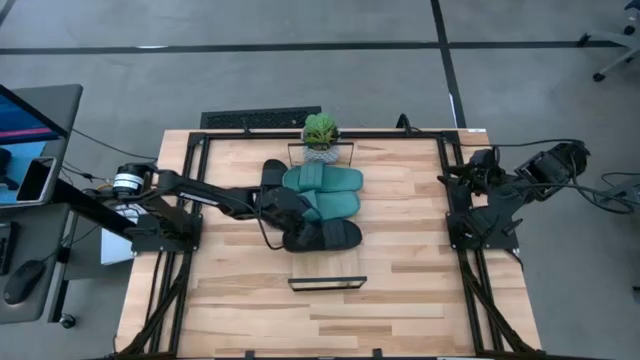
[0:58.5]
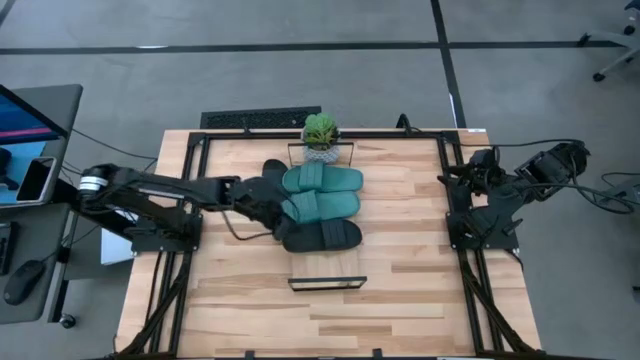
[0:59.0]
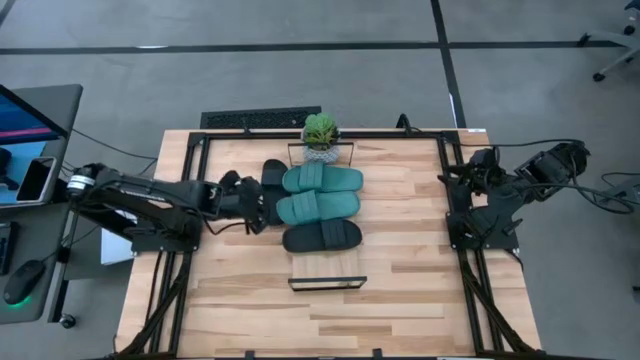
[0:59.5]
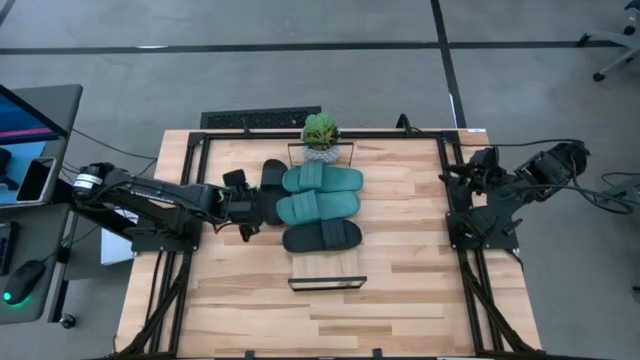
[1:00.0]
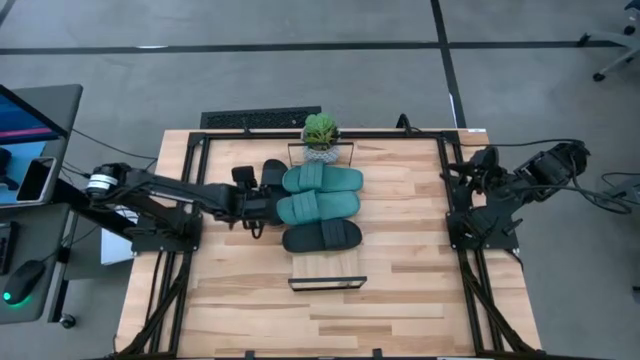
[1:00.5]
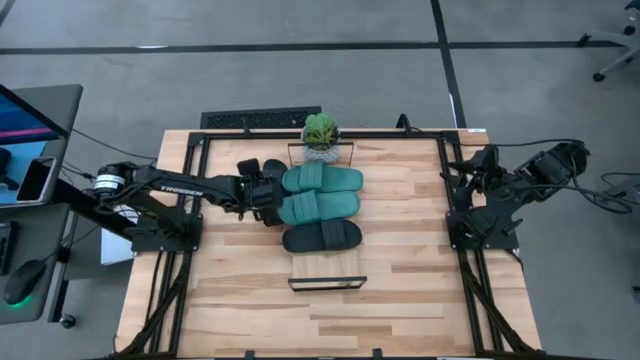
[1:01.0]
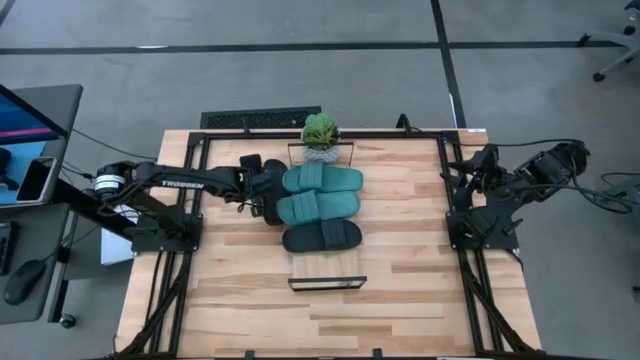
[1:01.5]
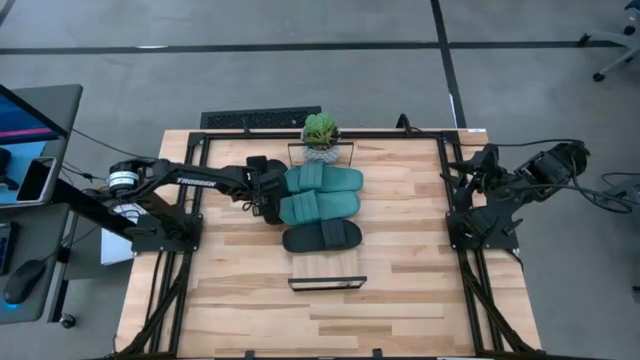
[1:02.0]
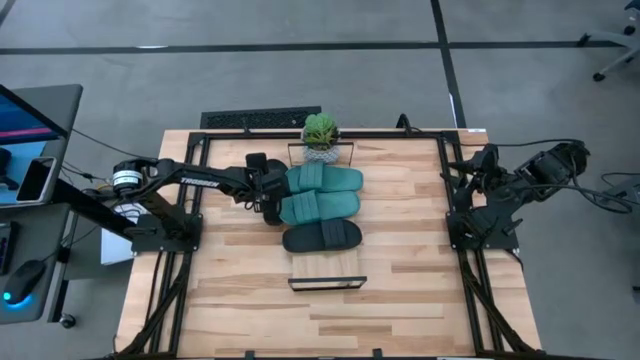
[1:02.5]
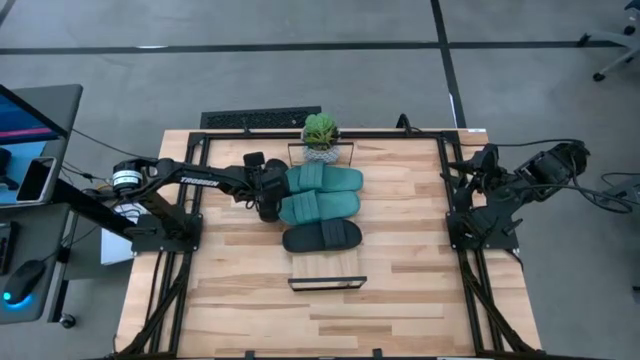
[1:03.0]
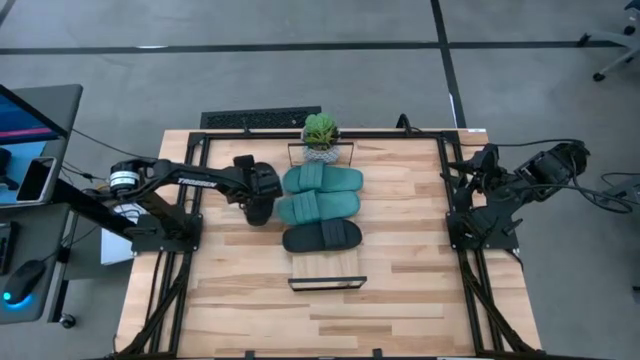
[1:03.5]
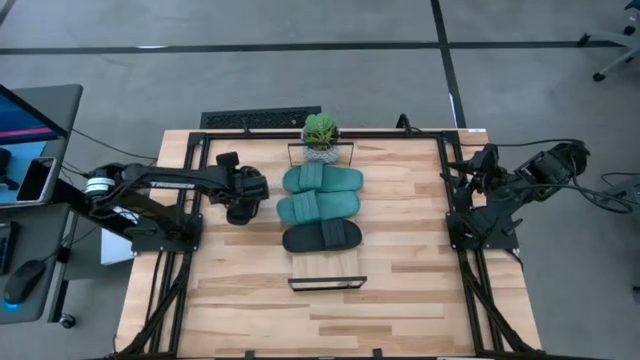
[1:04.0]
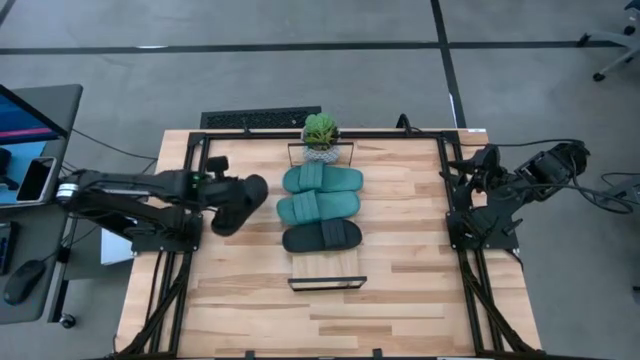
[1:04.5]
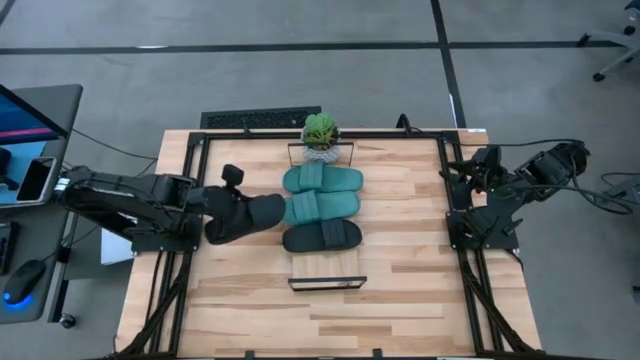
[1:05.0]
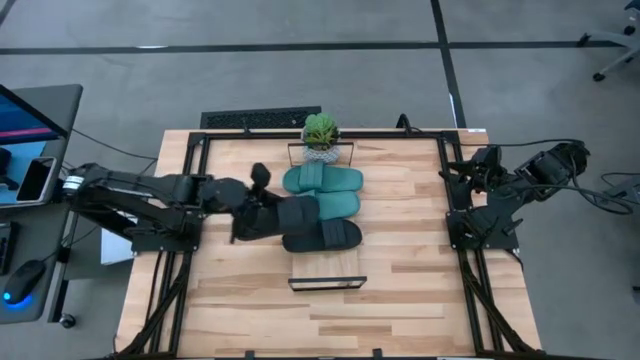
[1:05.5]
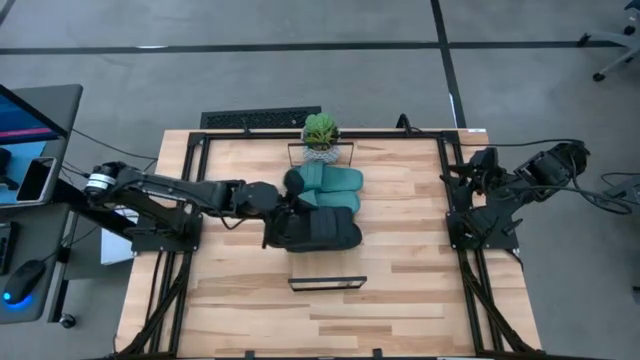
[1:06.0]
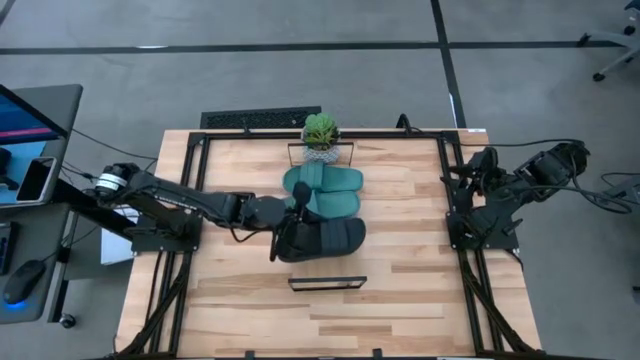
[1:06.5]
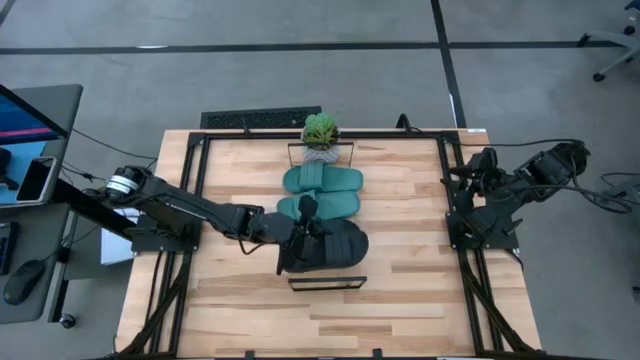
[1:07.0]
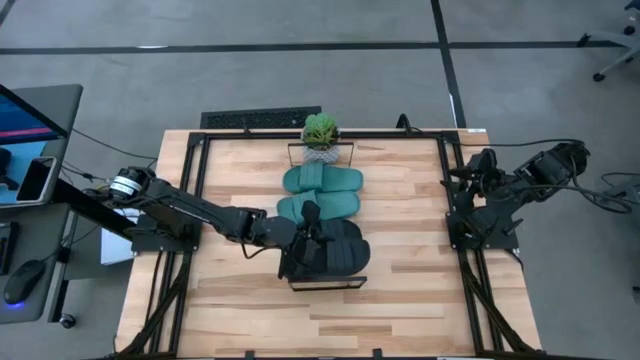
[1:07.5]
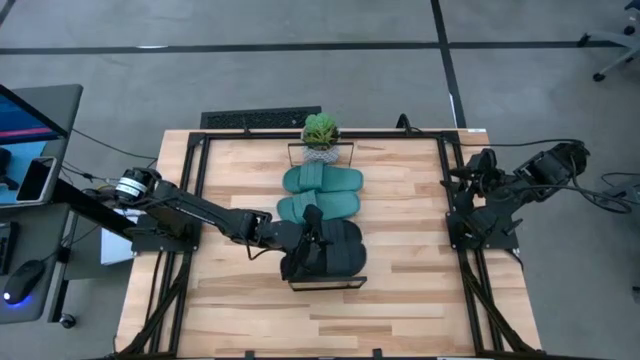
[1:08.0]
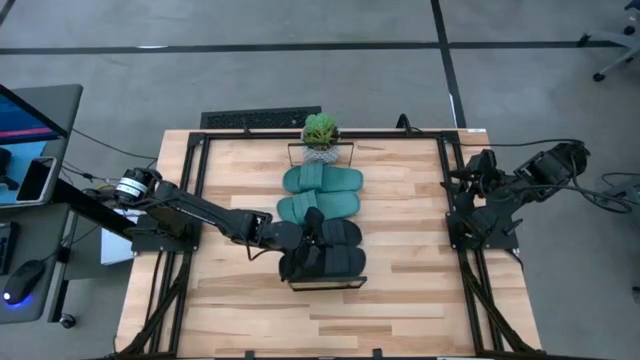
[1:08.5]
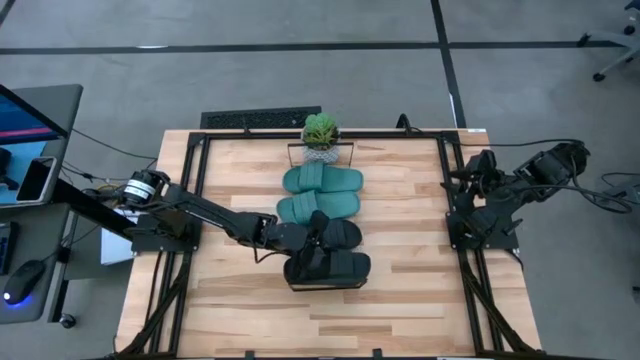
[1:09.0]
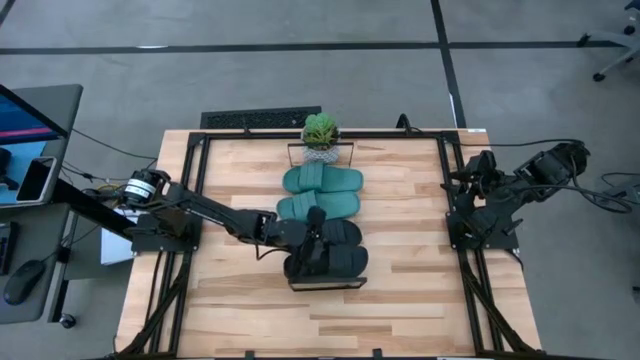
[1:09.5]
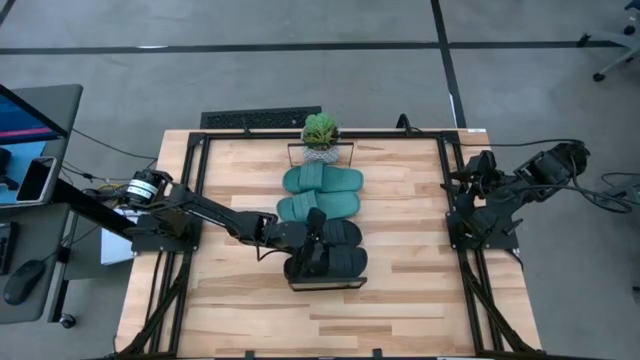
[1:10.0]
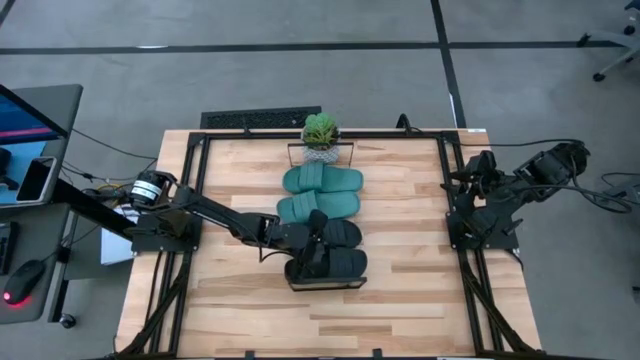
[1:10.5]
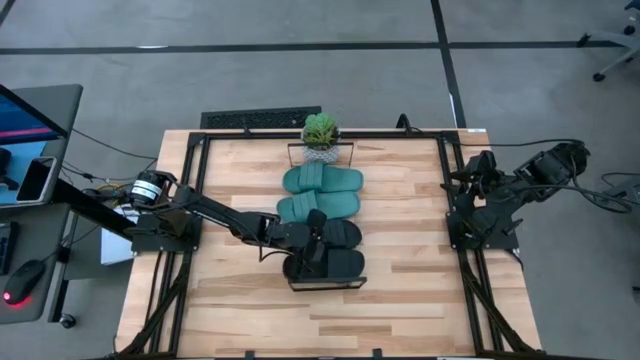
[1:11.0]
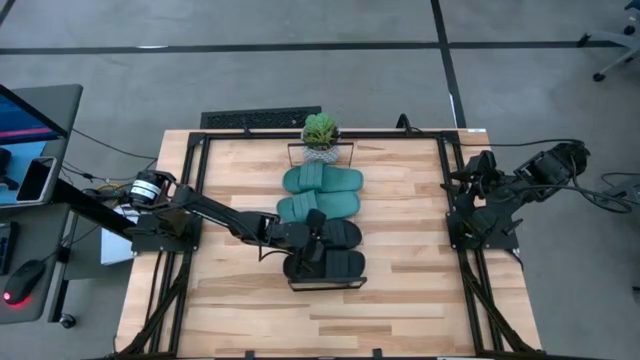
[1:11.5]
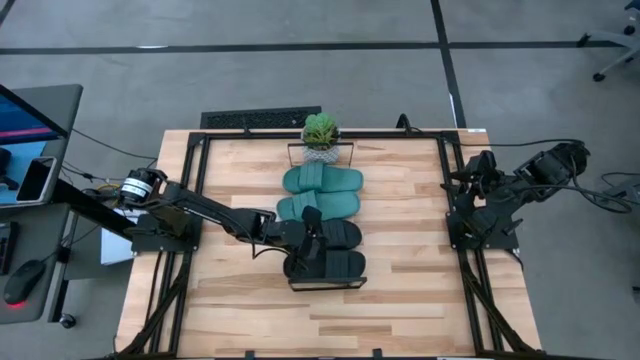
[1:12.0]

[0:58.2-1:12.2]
Task: Pick and place slides into the shelf
Put the black slide on the shelf

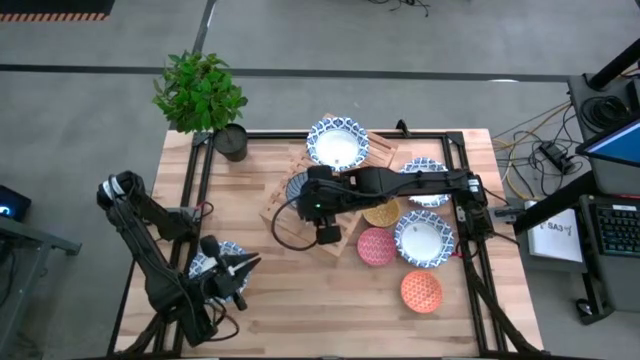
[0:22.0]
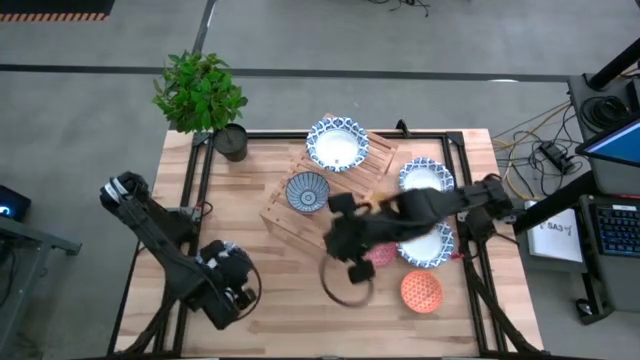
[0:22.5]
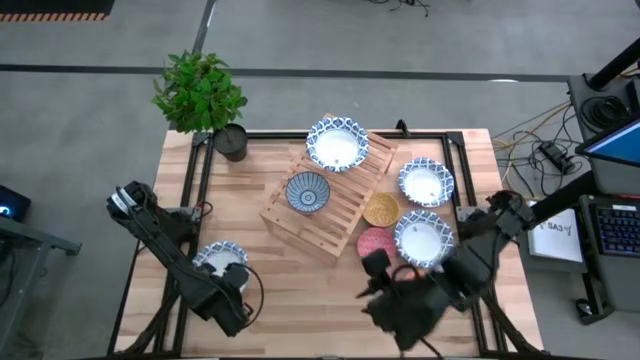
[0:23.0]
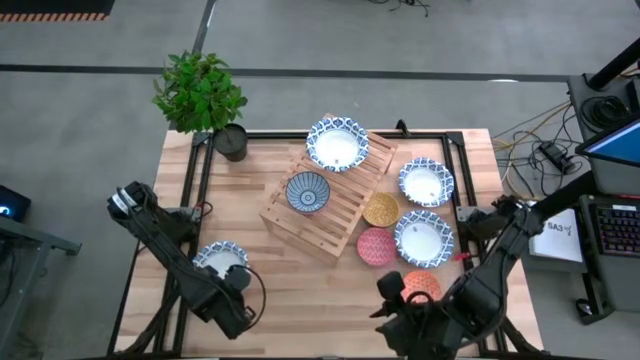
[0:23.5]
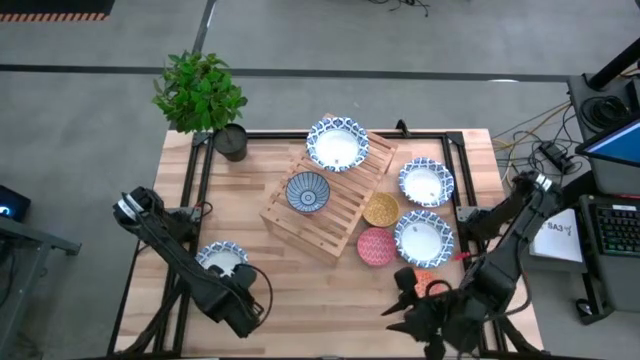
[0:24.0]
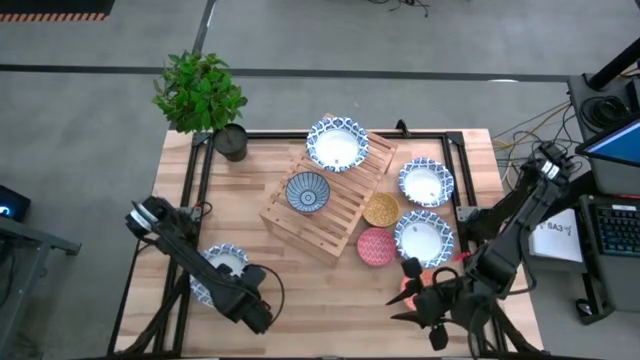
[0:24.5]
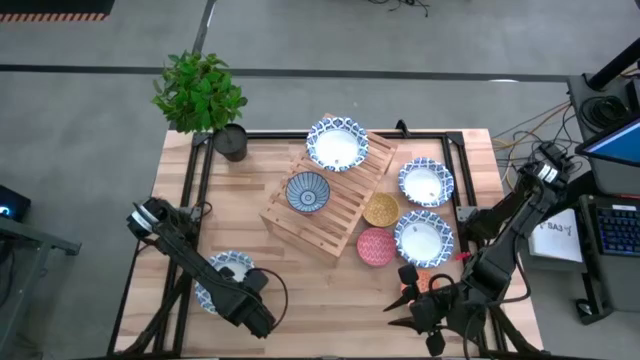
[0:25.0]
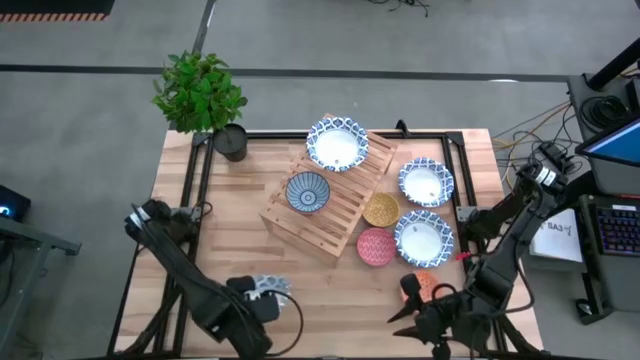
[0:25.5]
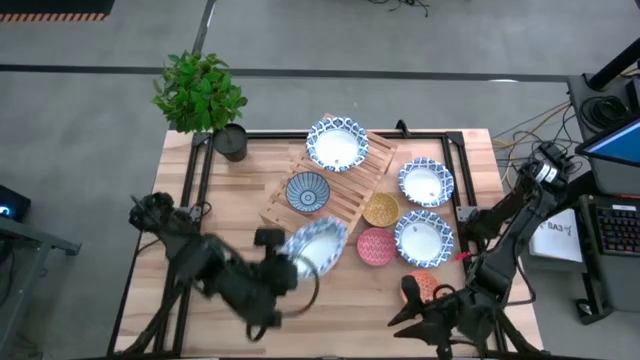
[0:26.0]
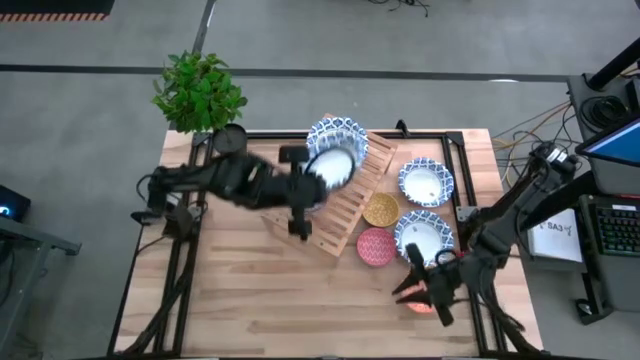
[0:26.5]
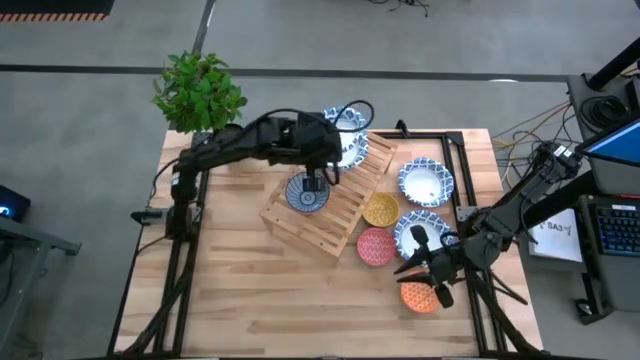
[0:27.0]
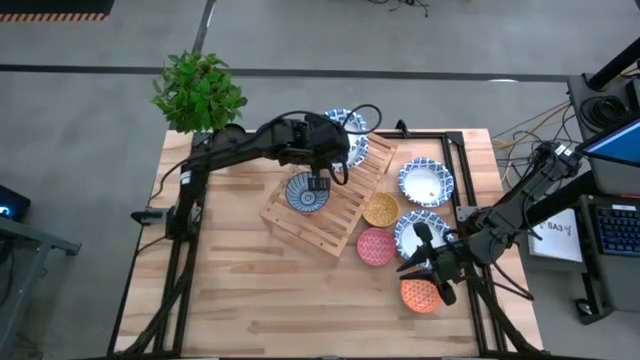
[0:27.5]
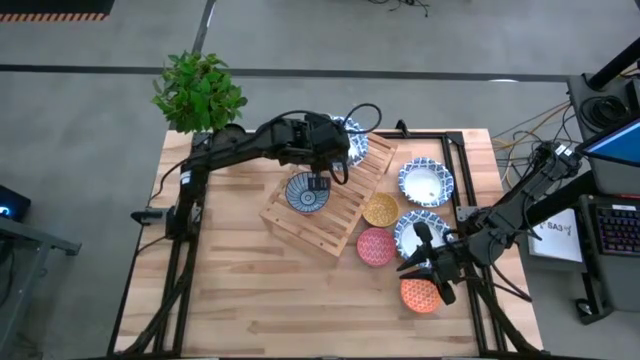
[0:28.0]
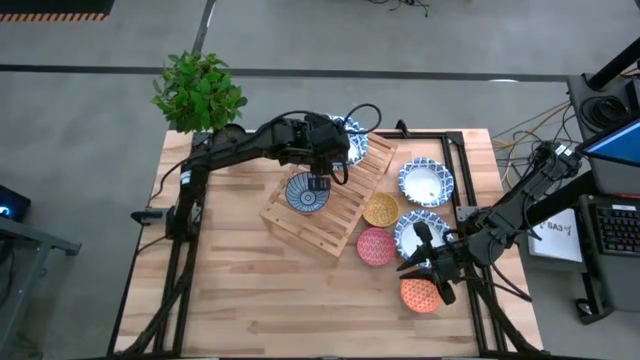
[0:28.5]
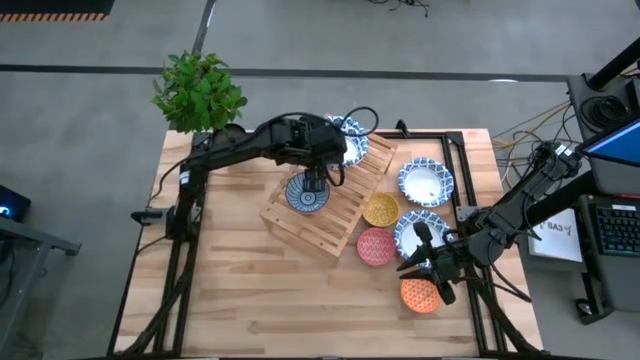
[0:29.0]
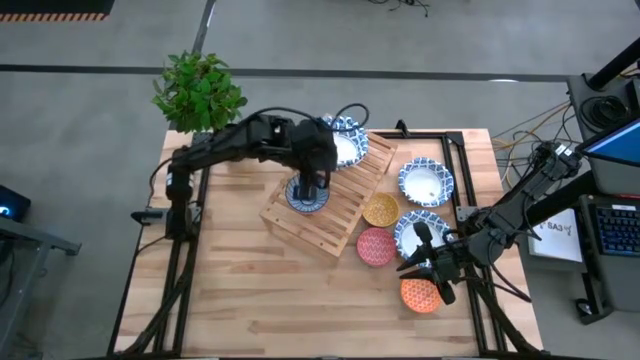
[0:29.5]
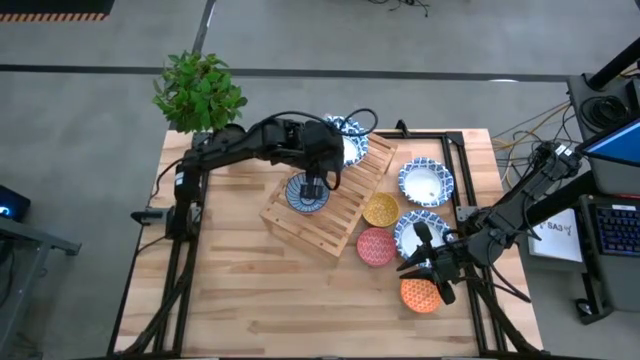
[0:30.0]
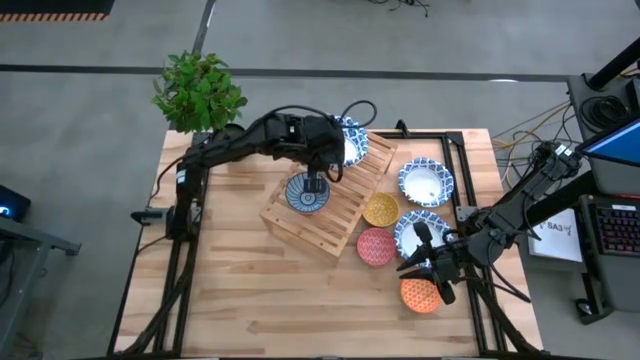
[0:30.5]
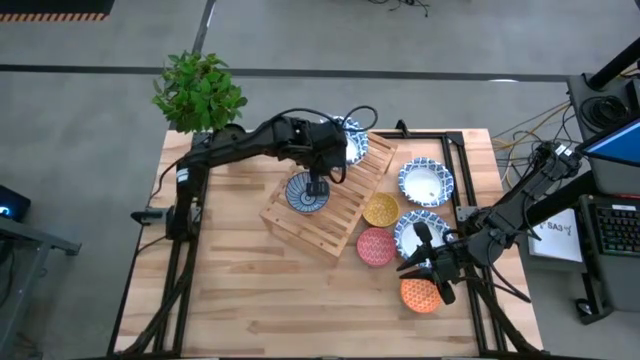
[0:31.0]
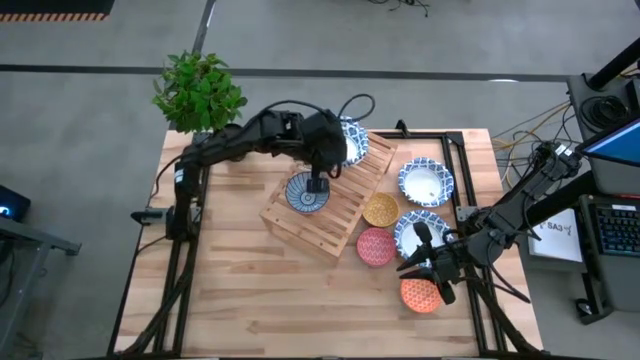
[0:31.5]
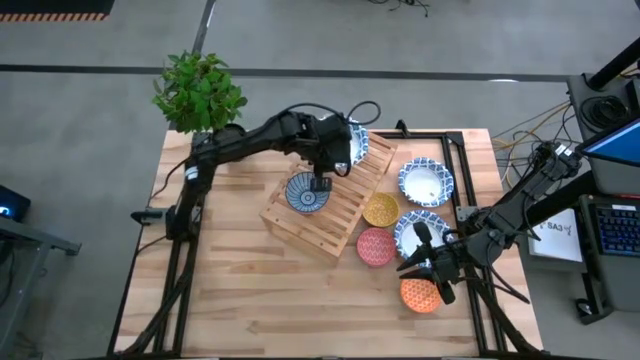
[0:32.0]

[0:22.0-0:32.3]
Task: Place and stack bowls onto a shelf
Stack the white patterned bowl on top of the white patterned bowl on the shelf
